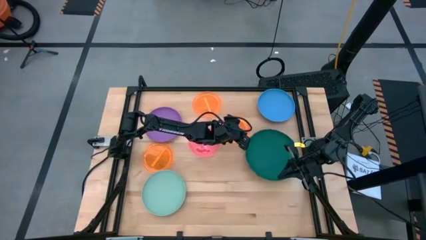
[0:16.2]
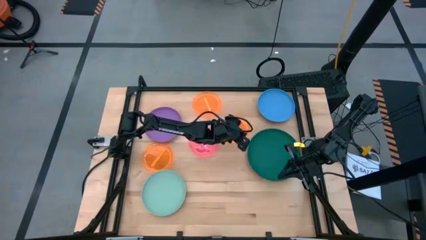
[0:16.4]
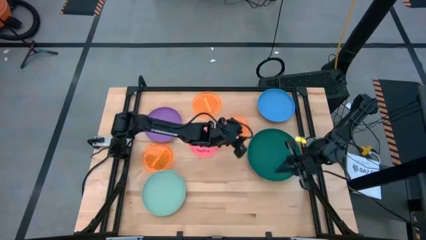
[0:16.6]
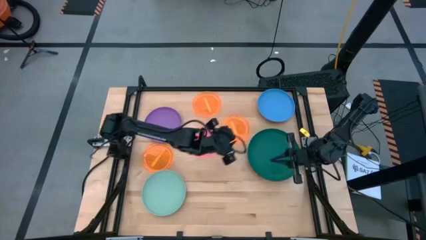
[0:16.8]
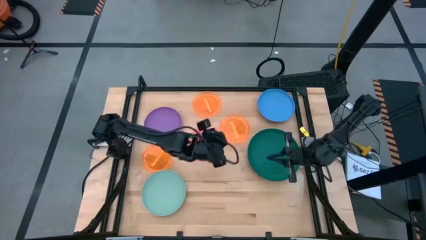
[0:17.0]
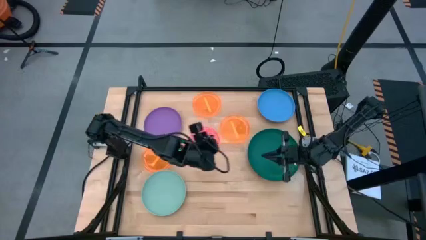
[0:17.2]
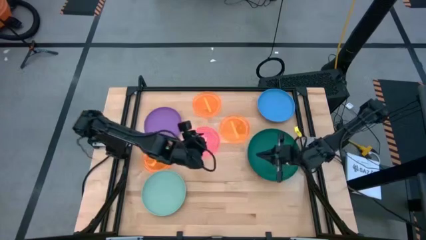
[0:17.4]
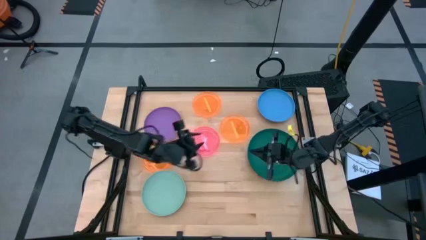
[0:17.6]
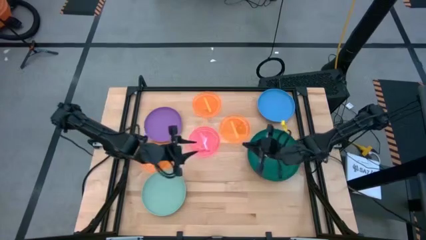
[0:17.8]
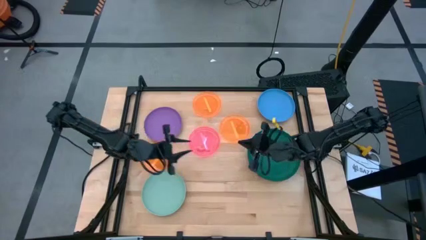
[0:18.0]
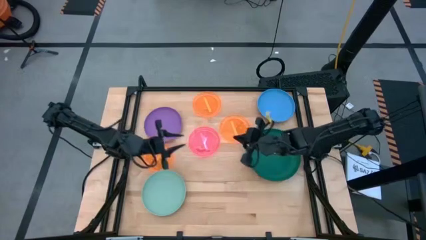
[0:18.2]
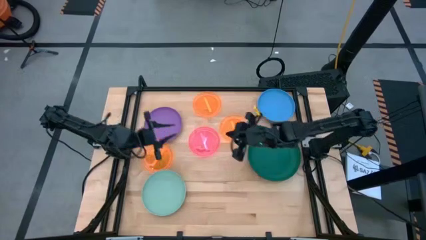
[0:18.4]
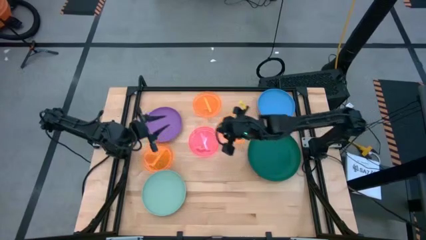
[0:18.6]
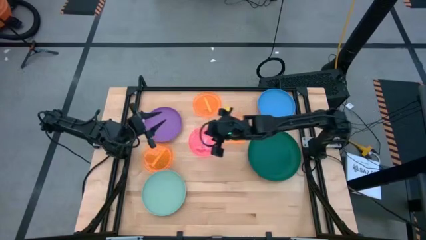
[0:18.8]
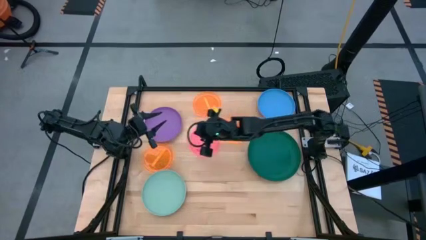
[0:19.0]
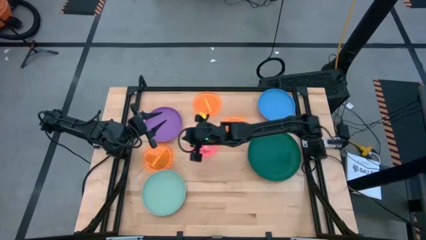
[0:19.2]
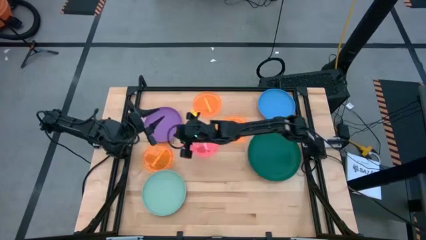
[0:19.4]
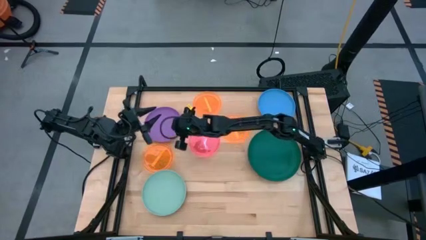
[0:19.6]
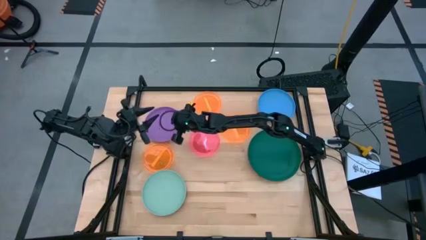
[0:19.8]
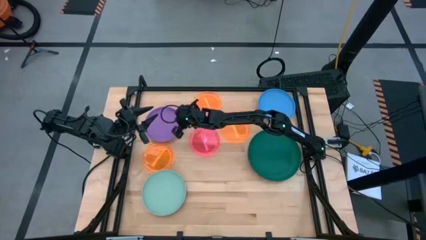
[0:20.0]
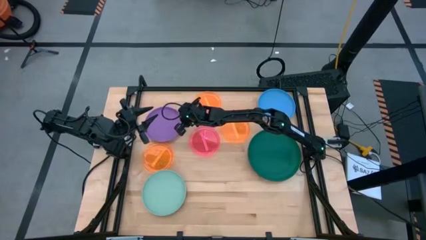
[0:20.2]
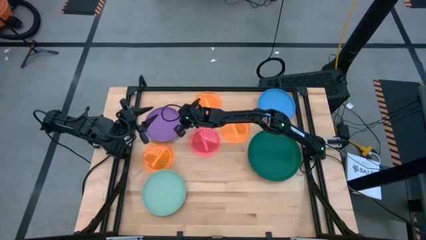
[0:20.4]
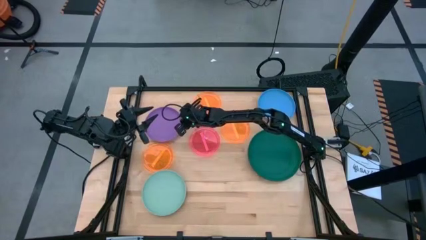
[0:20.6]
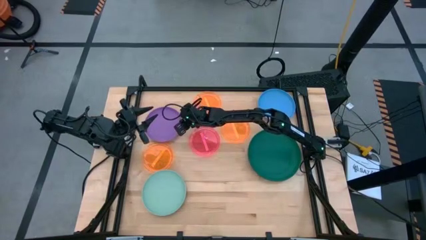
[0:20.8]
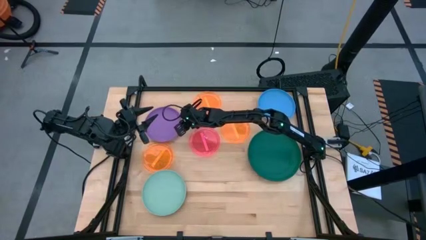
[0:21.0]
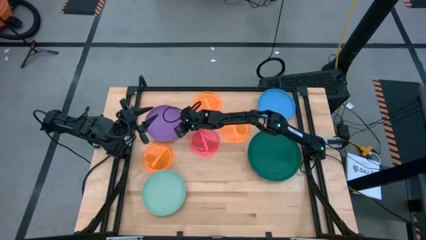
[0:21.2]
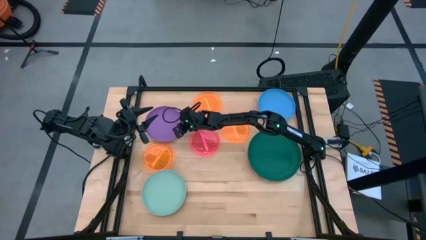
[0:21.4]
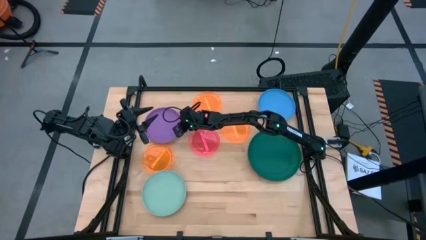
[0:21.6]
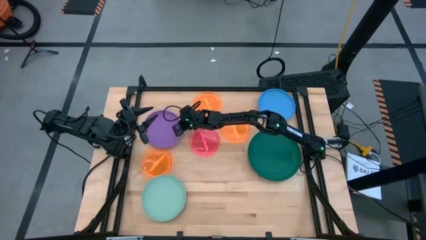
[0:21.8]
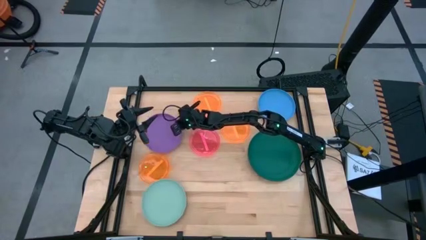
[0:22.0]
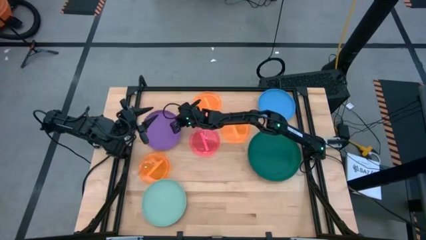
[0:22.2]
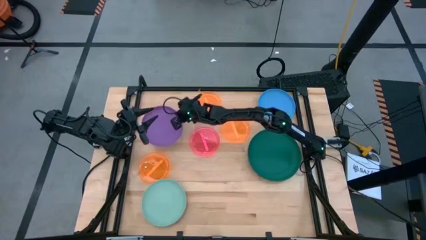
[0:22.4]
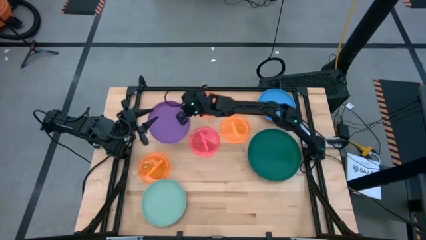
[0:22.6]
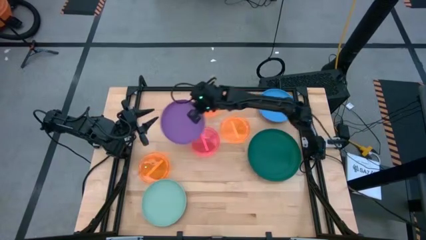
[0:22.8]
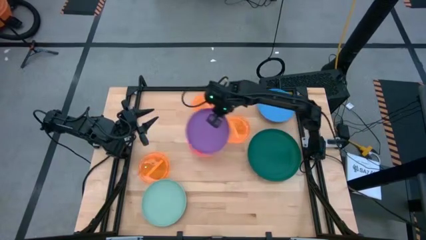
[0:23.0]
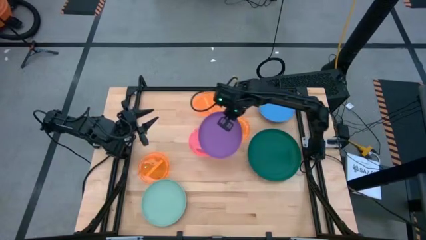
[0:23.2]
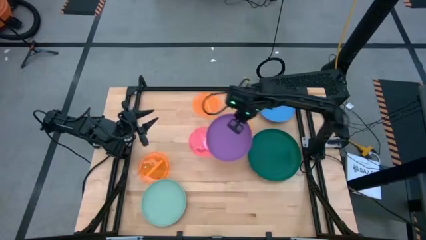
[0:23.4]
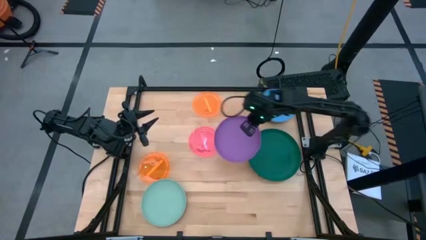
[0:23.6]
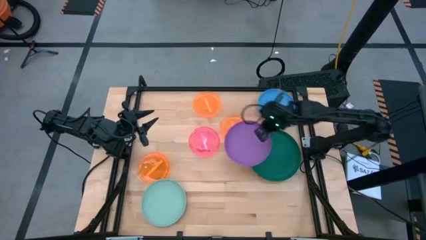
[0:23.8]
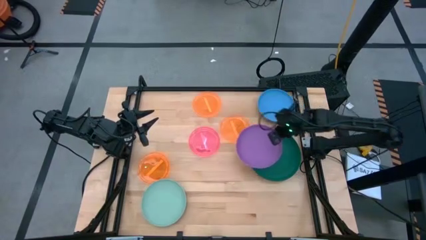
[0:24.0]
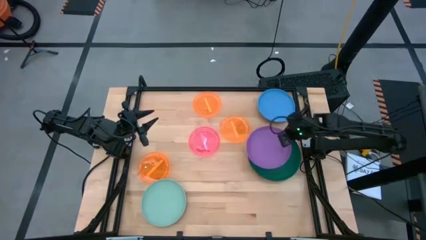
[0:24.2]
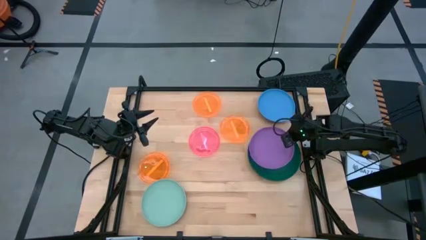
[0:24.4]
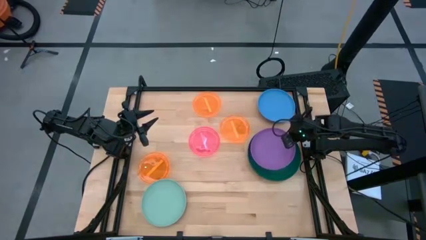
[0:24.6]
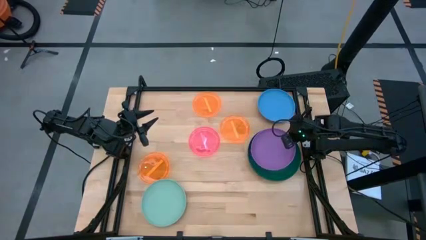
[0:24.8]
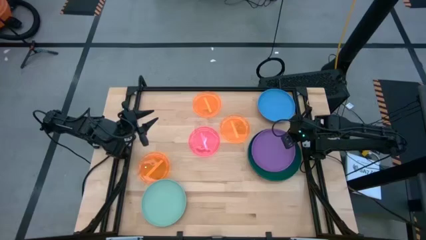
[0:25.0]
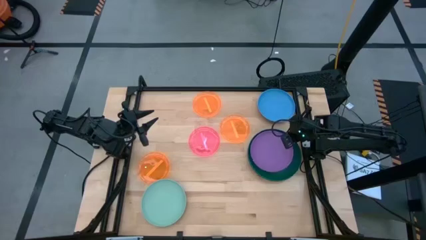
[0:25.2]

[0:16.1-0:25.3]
Task: Stack plastic plates
Stack the purple plate on top of the green plate

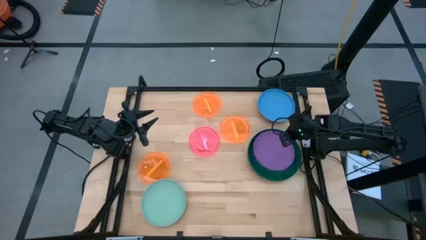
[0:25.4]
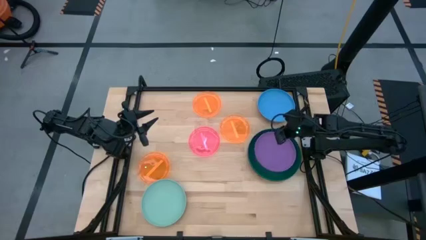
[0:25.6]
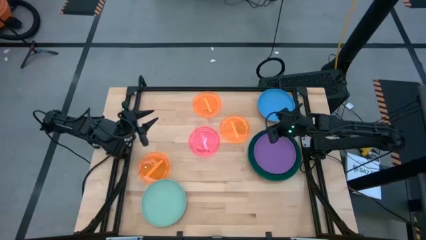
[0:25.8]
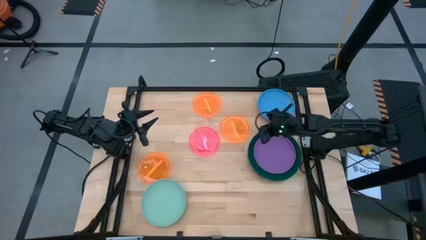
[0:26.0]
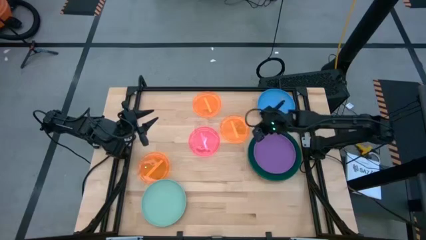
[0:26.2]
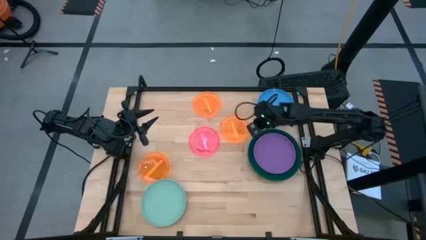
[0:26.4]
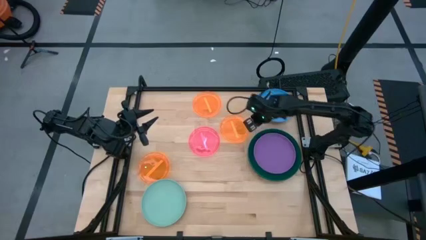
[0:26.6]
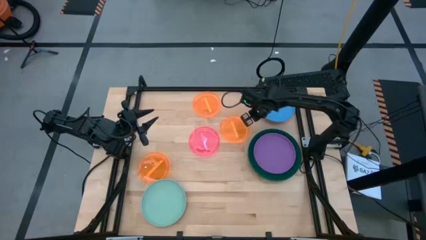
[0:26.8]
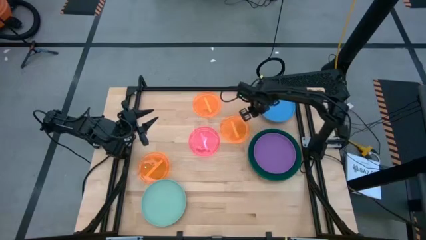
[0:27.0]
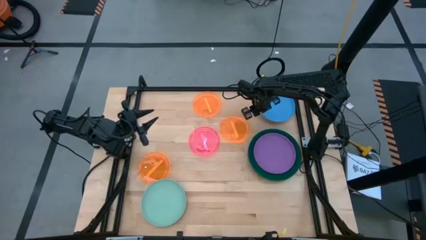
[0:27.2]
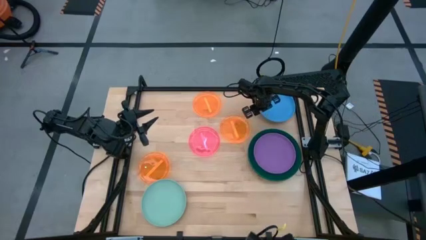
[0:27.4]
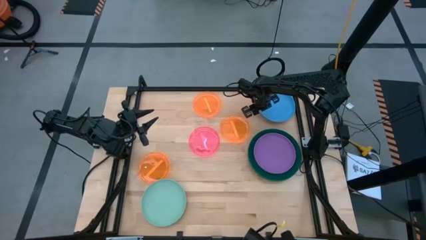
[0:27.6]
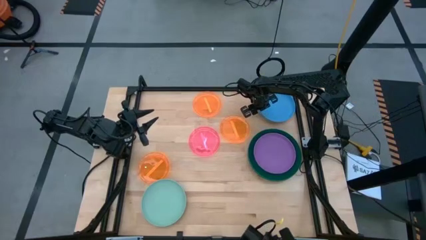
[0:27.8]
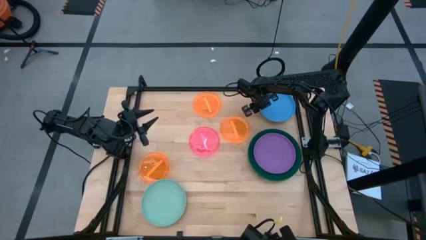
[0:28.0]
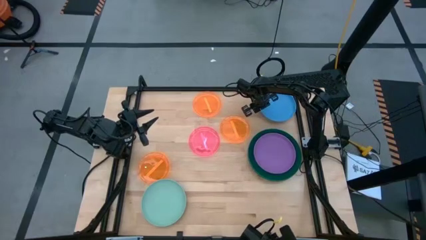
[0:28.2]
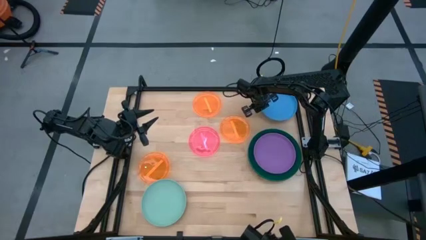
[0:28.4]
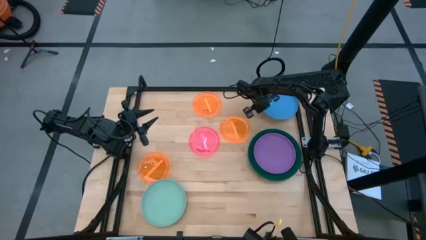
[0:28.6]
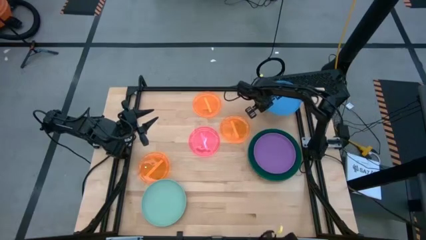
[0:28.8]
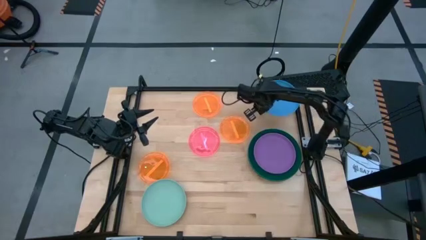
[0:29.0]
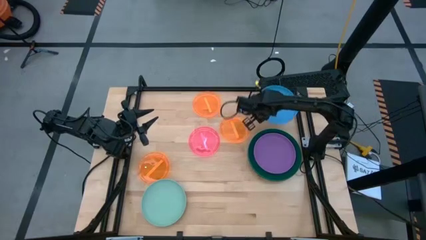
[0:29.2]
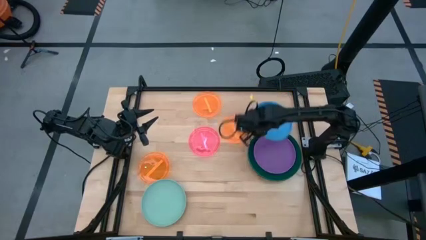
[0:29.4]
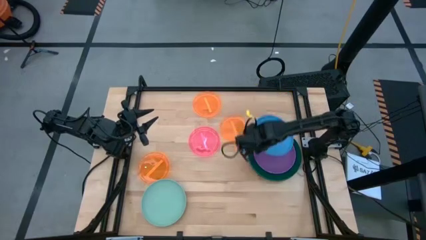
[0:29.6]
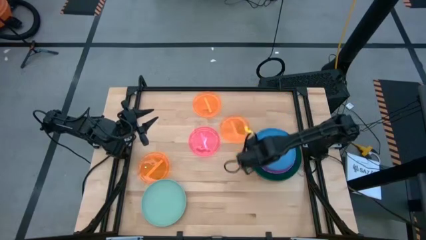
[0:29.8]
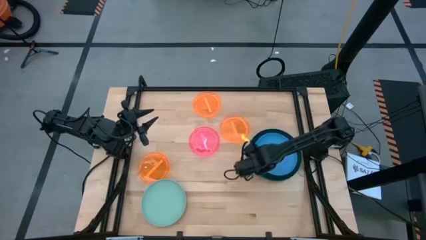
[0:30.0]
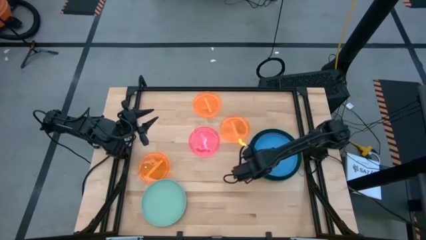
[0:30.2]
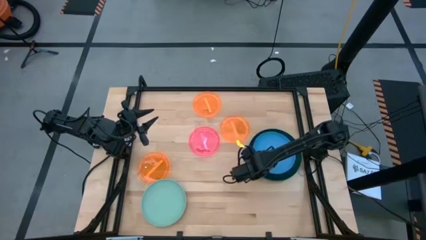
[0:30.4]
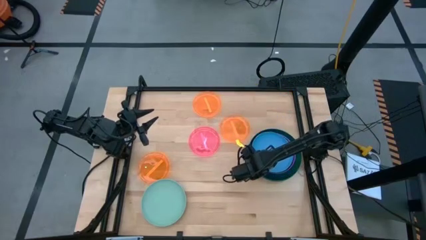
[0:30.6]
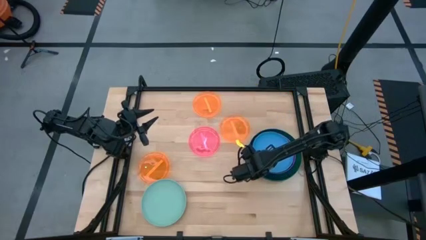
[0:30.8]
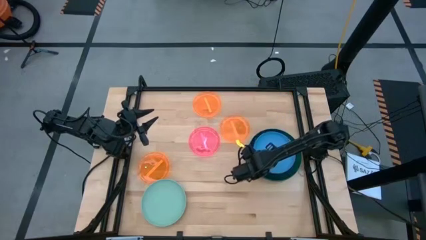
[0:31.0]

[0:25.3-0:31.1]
Stack the blue plate on top of the purple plate

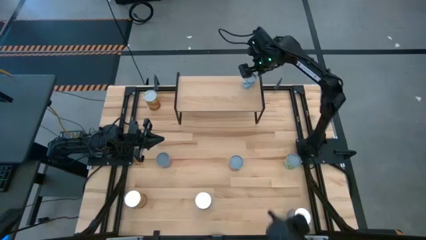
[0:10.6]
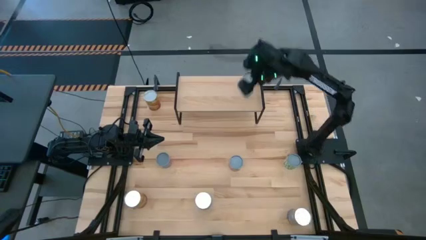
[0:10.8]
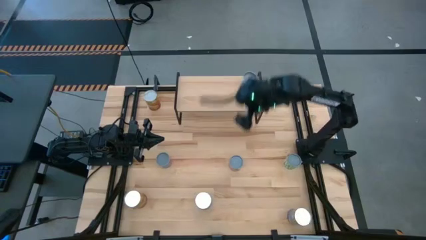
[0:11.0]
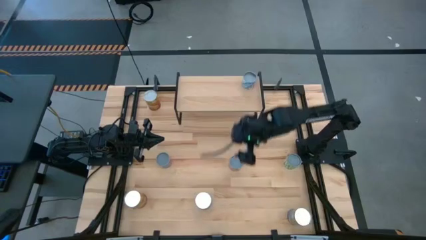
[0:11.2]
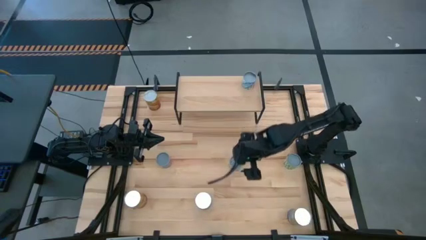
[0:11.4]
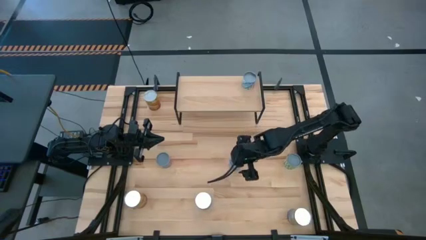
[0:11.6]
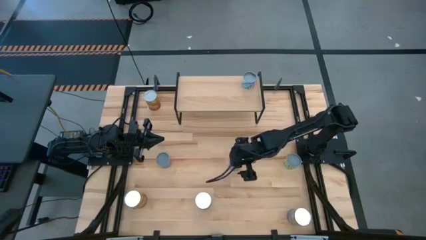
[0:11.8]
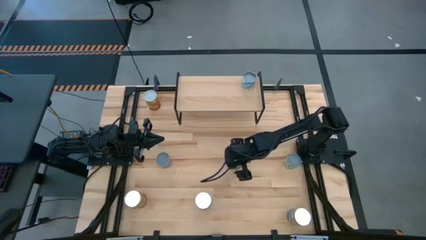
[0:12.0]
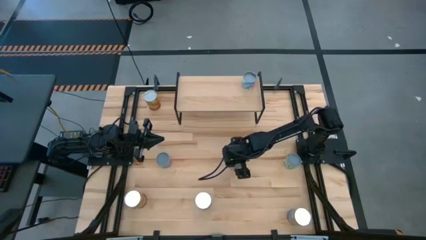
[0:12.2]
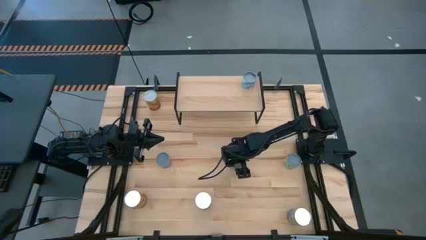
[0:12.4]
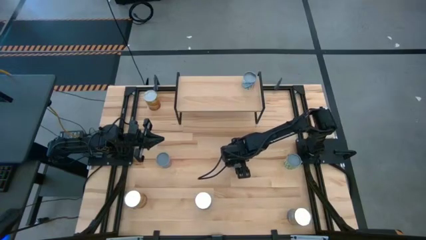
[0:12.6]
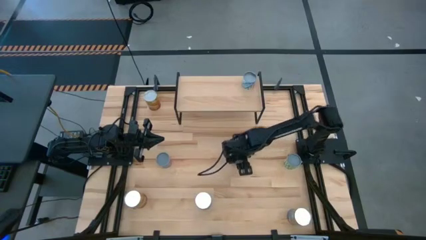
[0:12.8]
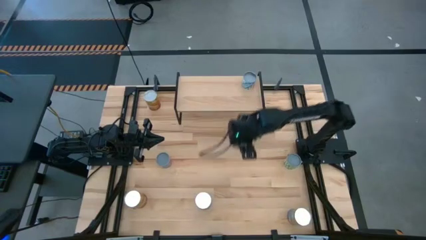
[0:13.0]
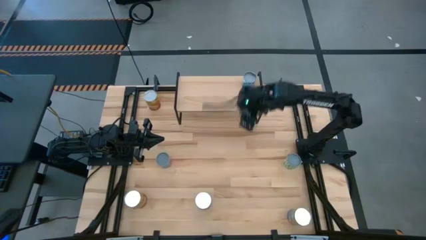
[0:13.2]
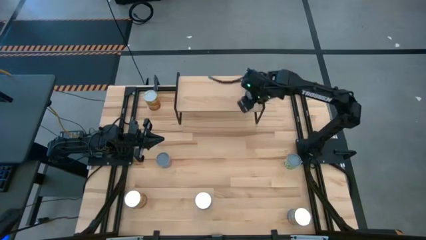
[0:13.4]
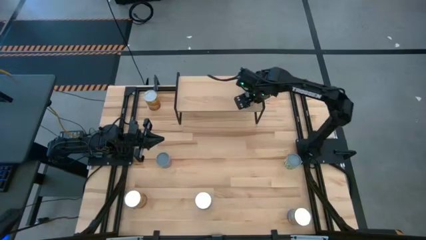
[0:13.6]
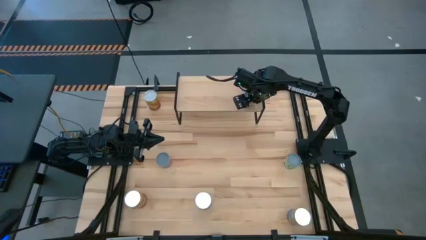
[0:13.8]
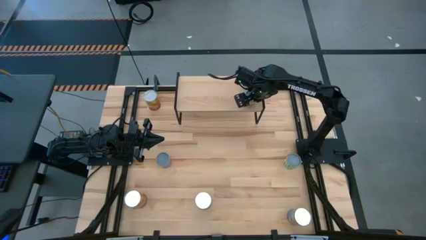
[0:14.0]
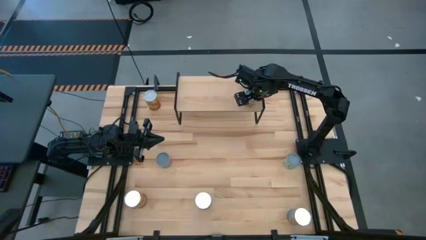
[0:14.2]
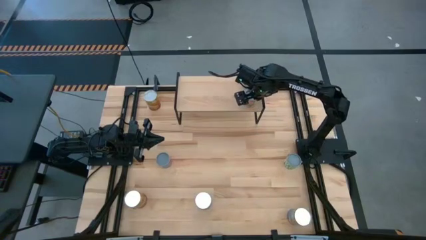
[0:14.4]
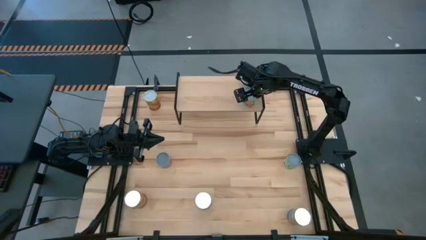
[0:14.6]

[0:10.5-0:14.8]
Task: Pick and place cans onto a shelf
Put the canned orange on the shelf
